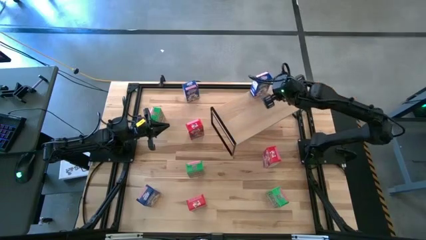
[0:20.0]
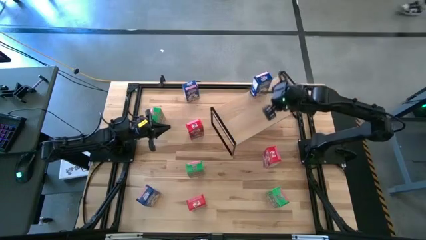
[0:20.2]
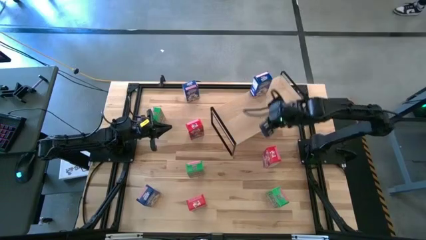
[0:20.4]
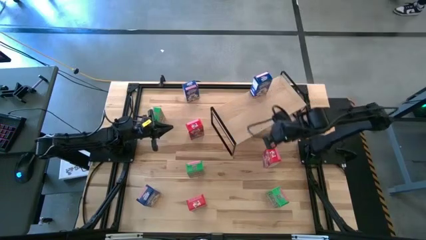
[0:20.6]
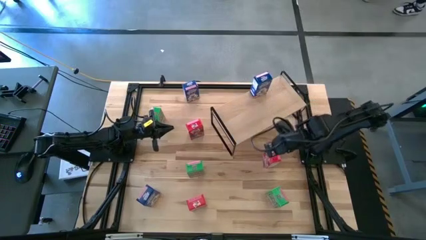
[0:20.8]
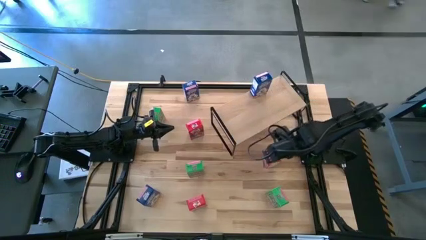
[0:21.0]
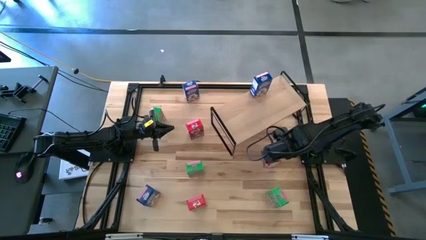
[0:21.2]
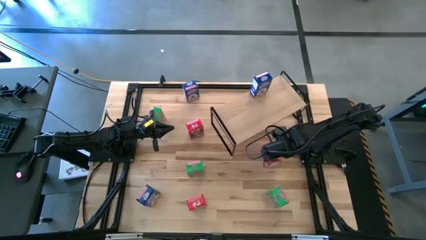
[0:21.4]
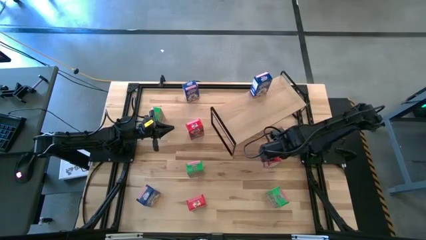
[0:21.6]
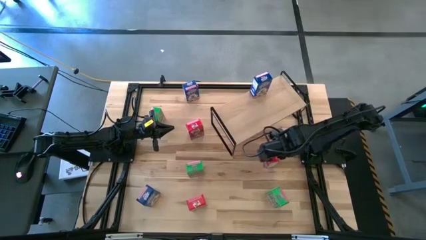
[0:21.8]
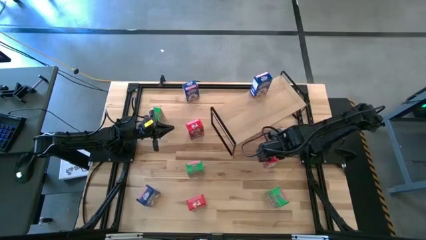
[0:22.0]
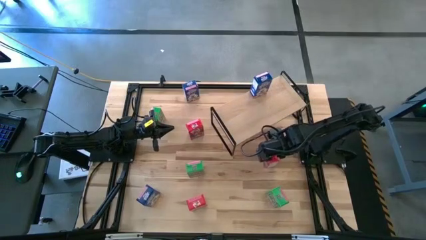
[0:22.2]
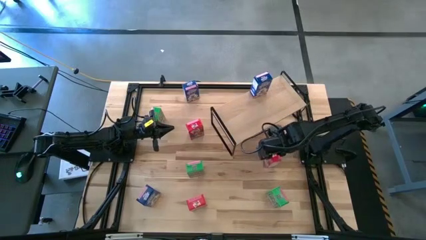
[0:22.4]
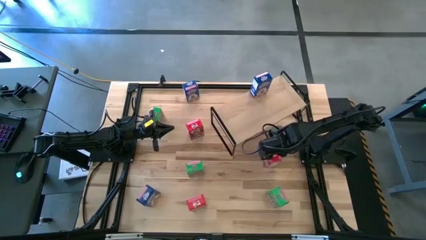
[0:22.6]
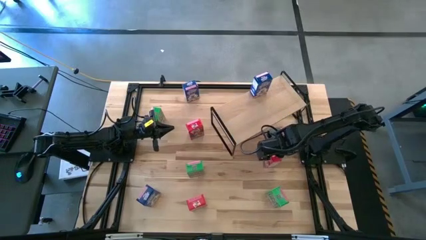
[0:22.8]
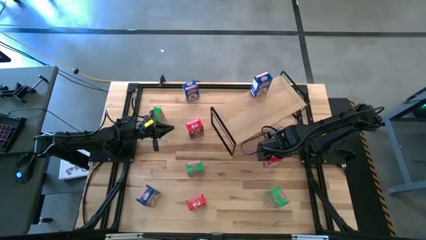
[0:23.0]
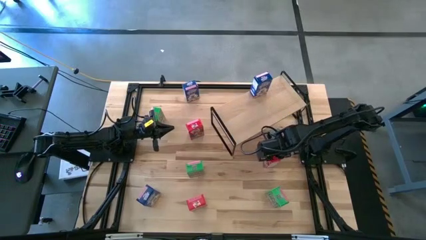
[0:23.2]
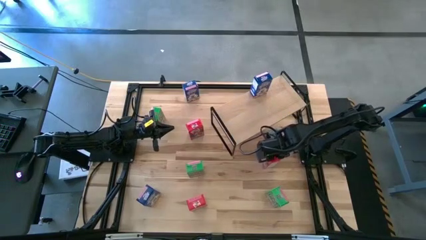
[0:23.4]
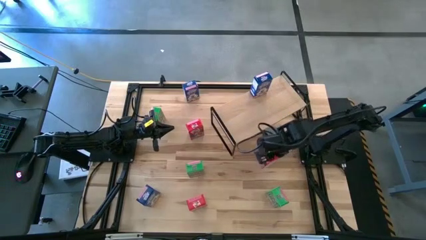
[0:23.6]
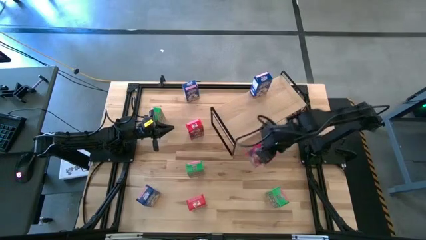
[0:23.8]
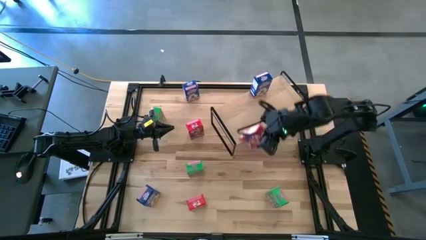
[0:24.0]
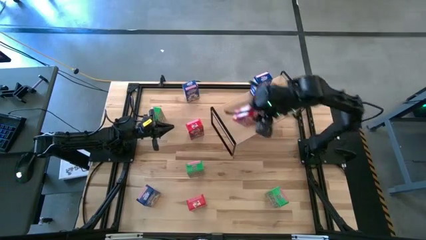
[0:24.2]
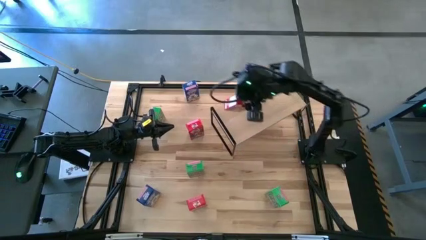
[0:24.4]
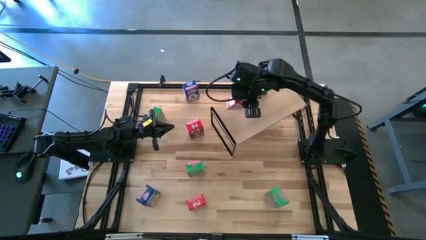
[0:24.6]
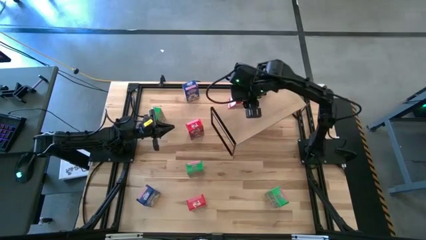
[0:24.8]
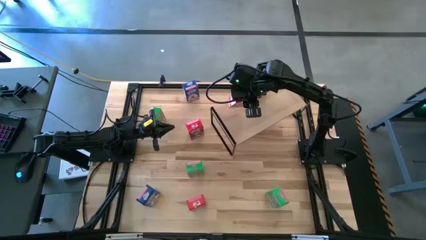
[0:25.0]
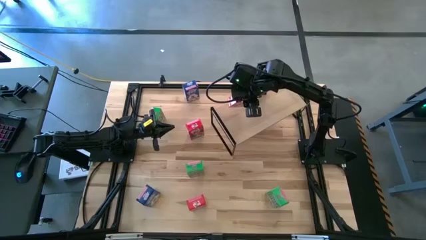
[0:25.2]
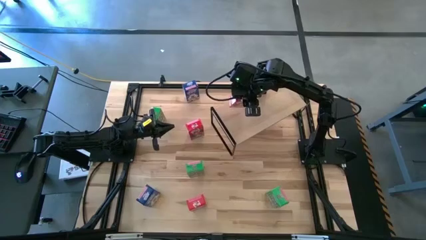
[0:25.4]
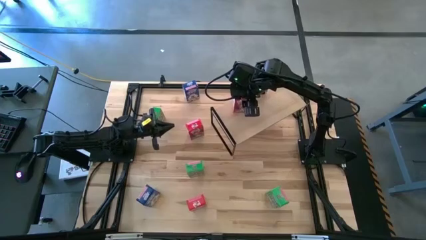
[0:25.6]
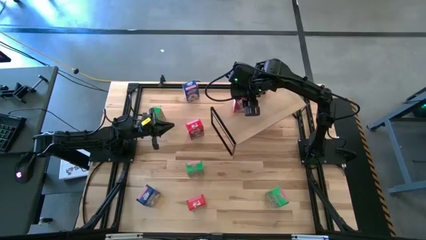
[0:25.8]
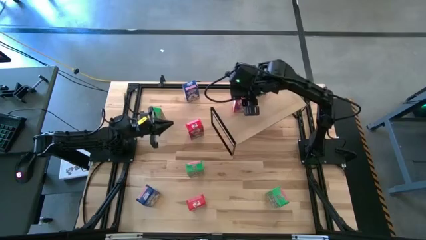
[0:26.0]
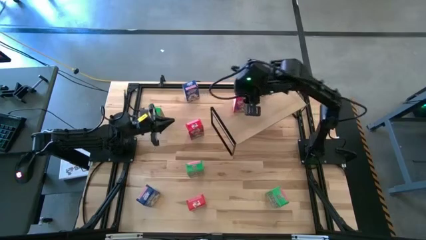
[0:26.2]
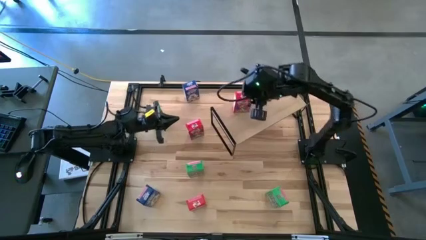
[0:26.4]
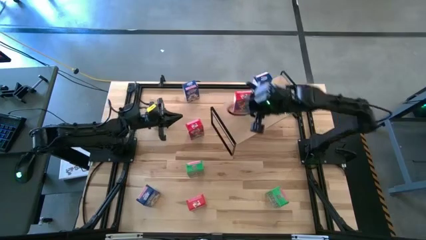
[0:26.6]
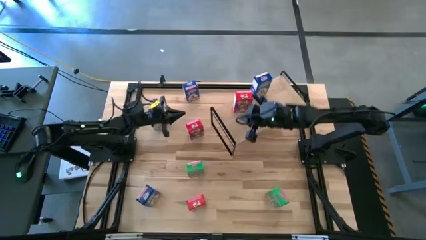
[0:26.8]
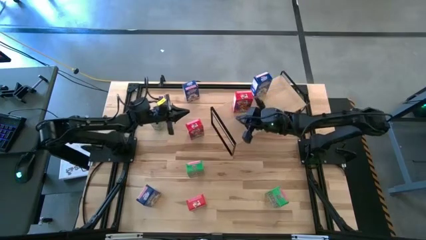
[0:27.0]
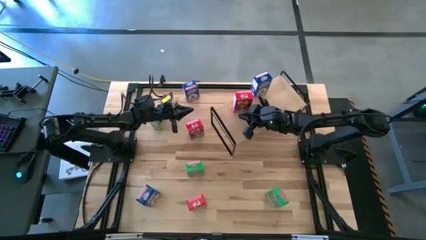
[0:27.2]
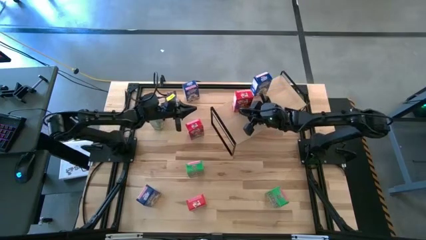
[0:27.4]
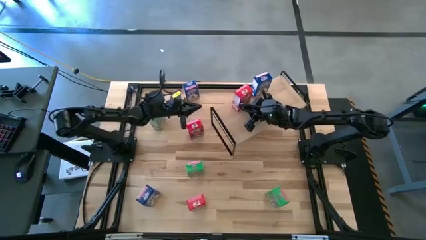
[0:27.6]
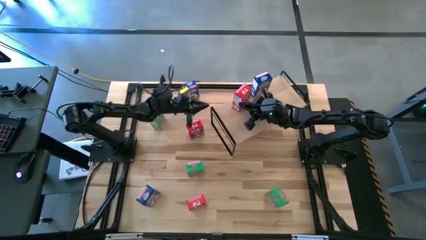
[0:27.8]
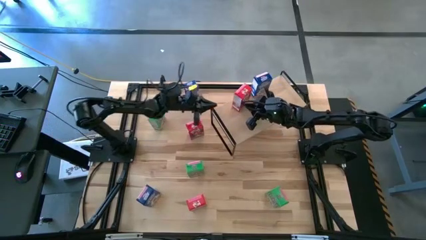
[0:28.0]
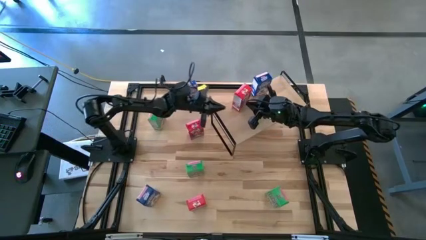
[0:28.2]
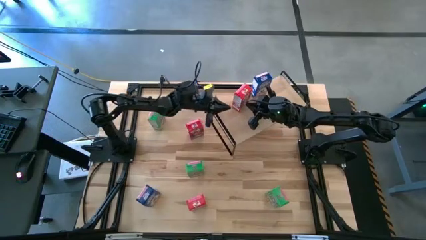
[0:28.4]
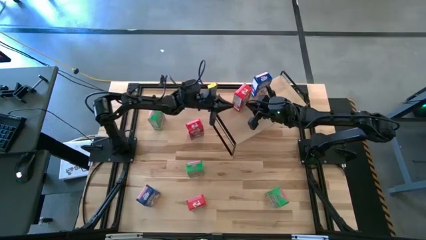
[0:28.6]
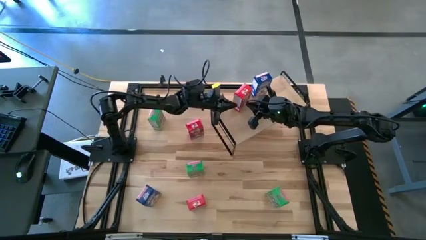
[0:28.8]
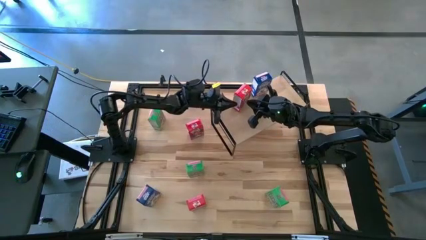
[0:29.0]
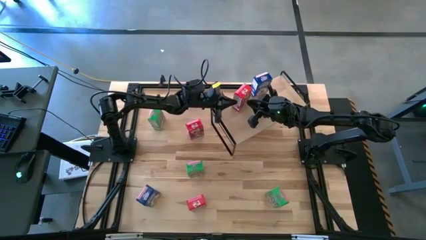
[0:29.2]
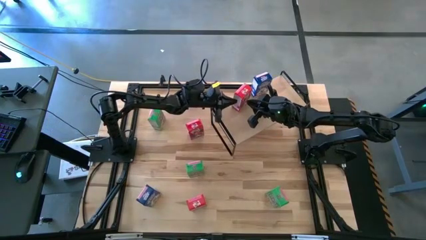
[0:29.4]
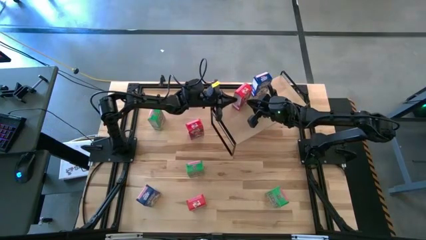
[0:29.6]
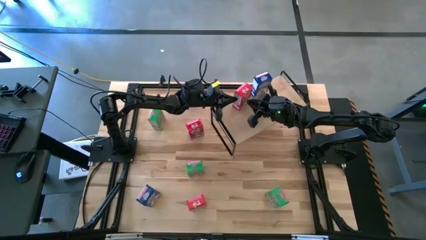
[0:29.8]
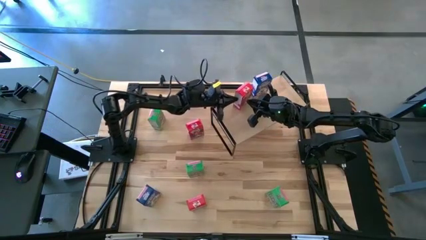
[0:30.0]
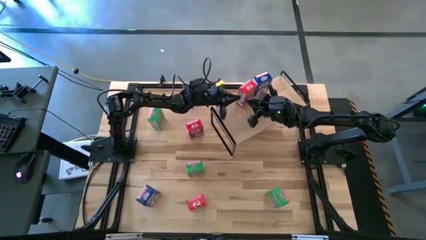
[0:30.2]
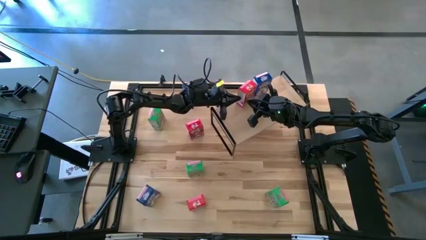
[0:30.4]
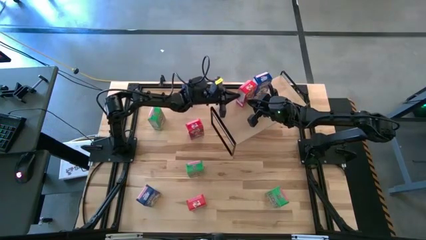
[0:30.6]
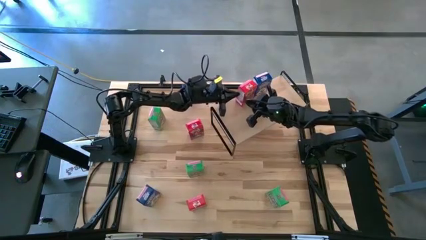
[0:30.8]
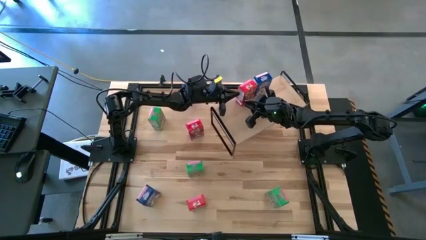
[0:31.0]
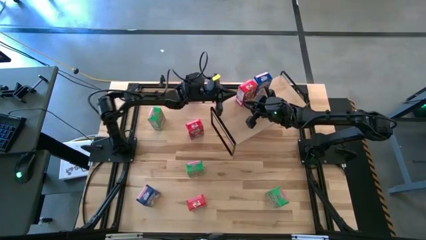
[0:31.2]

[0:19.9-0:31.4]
Task: Stack cereal on shelf
Put the middle right red cereal box on the shelf
